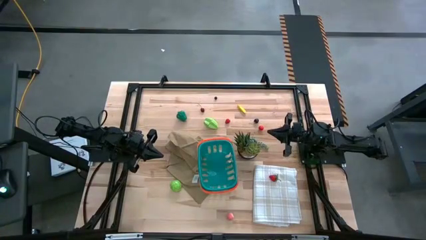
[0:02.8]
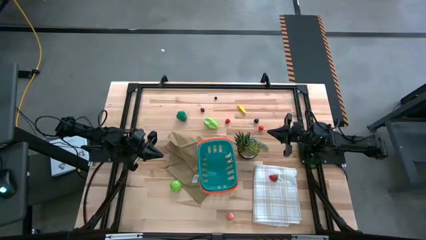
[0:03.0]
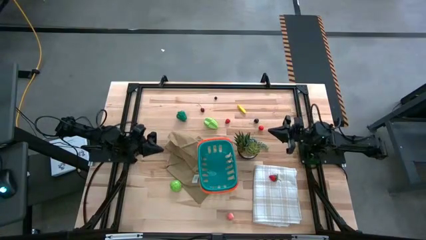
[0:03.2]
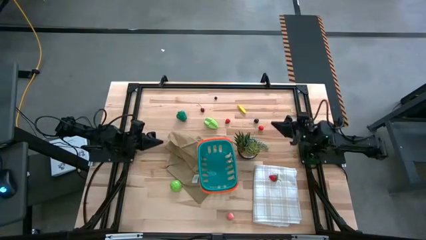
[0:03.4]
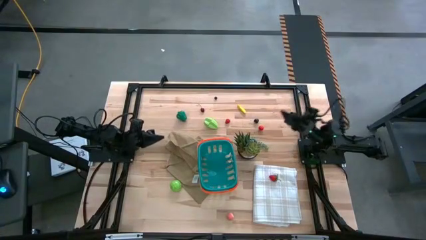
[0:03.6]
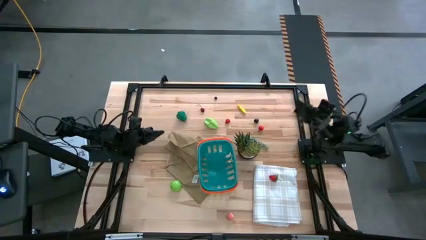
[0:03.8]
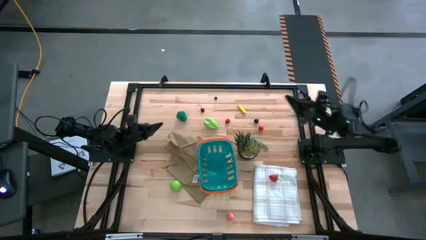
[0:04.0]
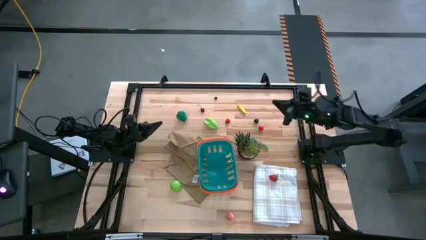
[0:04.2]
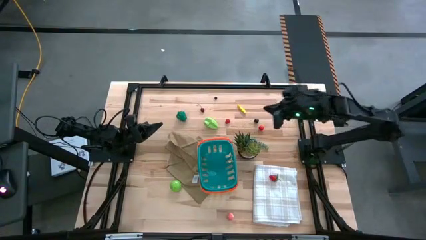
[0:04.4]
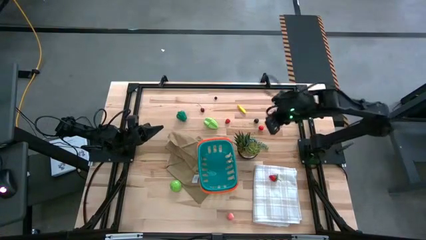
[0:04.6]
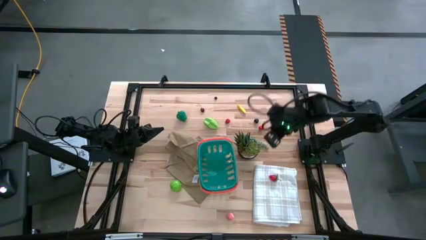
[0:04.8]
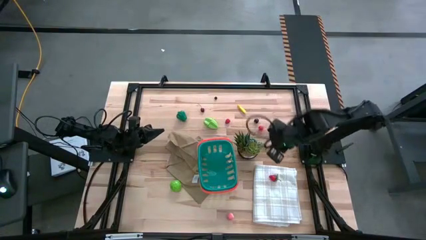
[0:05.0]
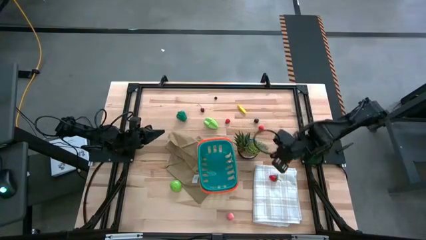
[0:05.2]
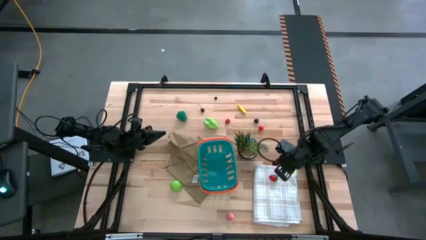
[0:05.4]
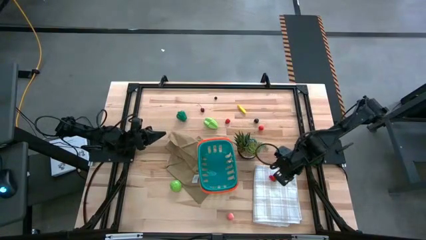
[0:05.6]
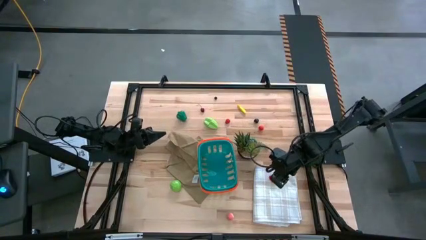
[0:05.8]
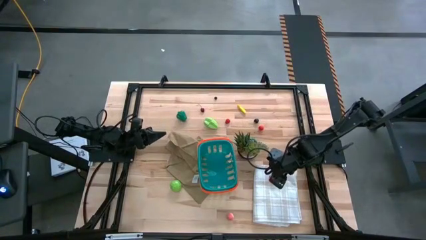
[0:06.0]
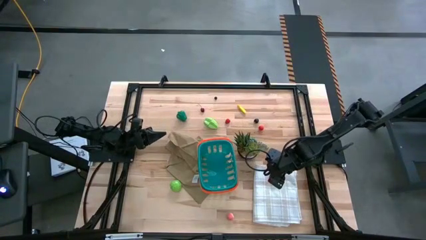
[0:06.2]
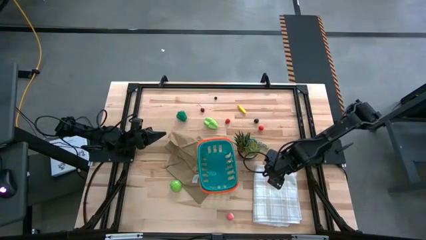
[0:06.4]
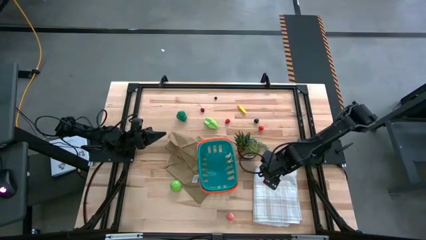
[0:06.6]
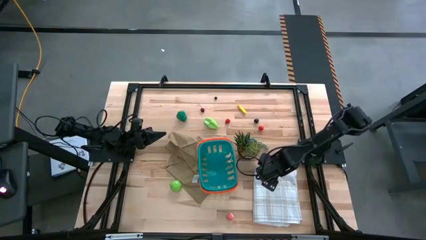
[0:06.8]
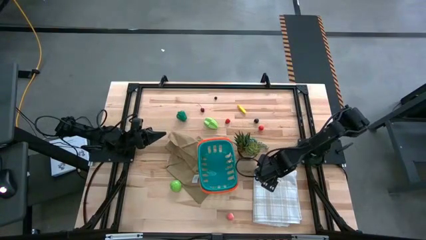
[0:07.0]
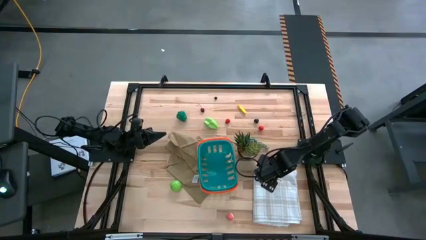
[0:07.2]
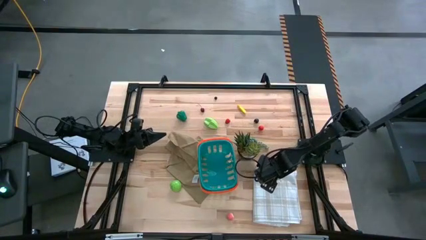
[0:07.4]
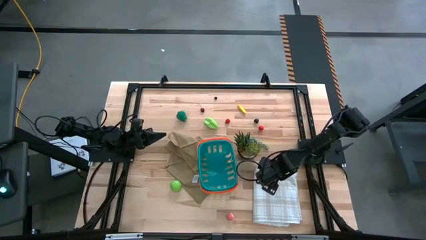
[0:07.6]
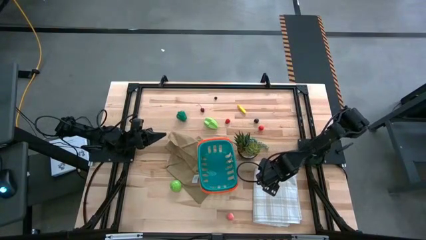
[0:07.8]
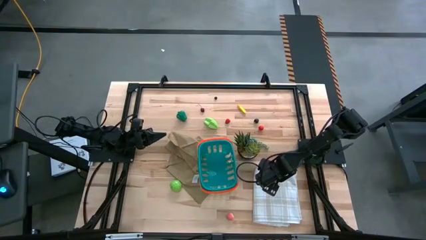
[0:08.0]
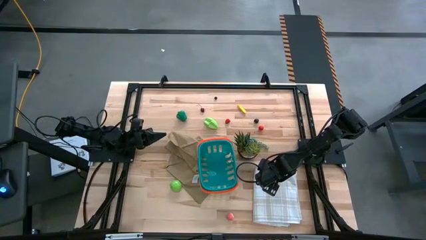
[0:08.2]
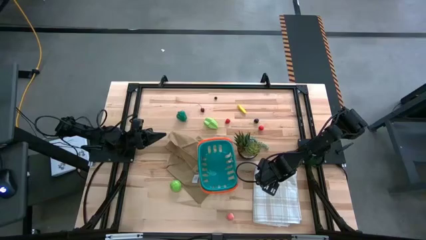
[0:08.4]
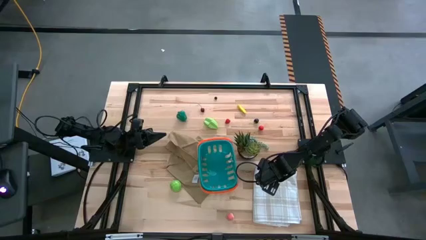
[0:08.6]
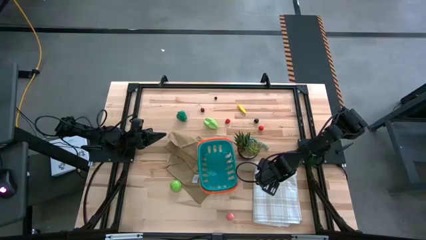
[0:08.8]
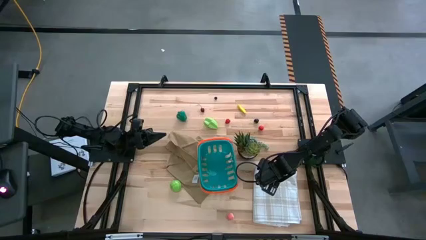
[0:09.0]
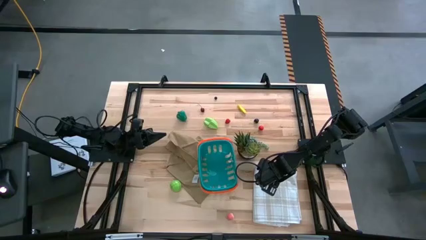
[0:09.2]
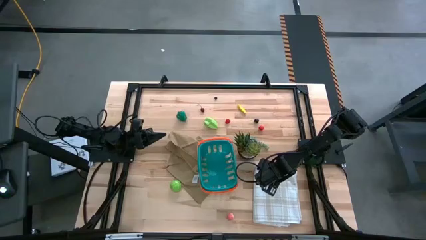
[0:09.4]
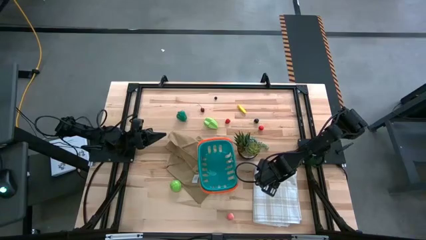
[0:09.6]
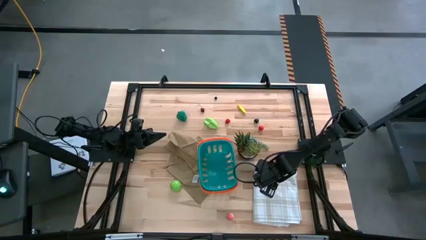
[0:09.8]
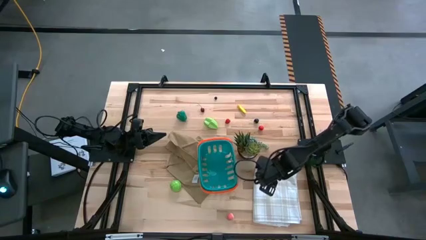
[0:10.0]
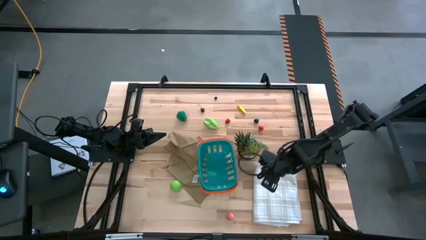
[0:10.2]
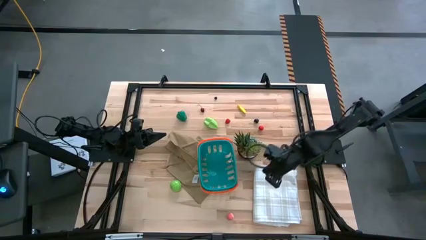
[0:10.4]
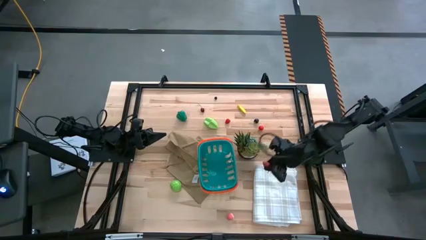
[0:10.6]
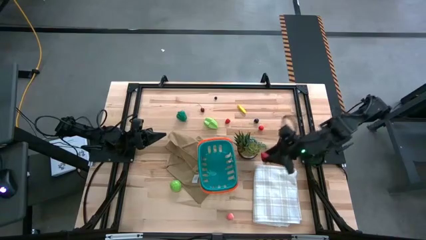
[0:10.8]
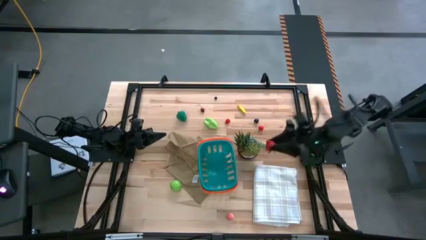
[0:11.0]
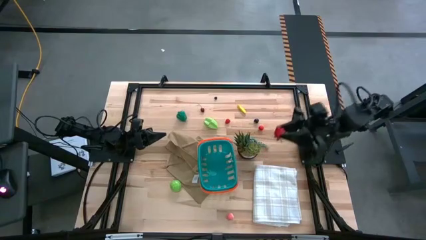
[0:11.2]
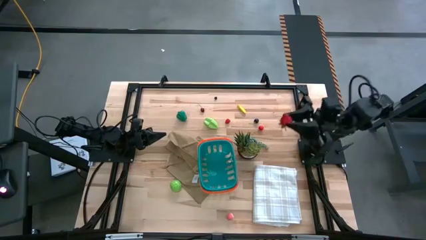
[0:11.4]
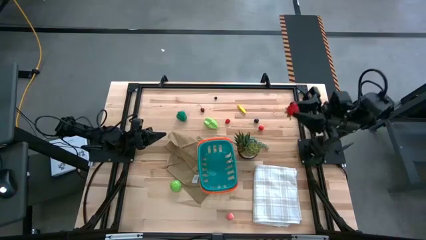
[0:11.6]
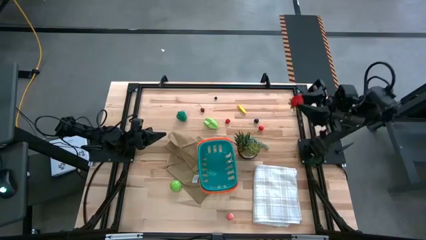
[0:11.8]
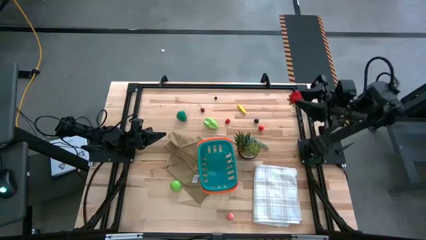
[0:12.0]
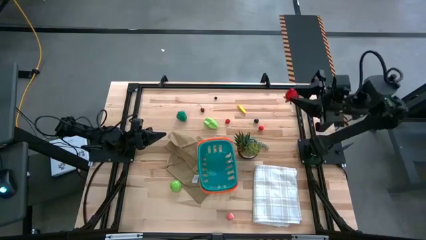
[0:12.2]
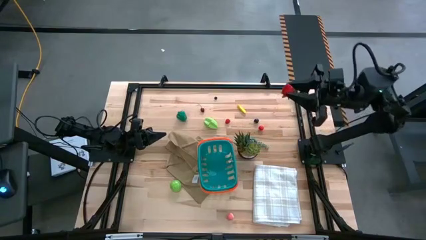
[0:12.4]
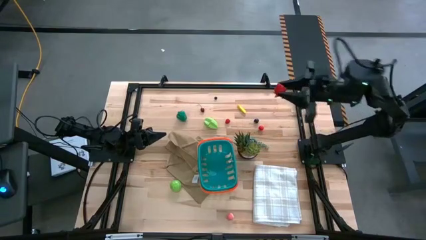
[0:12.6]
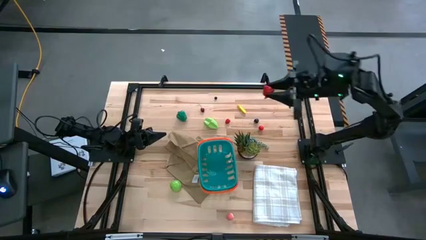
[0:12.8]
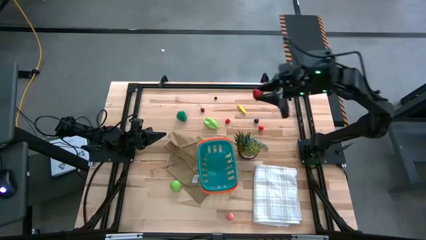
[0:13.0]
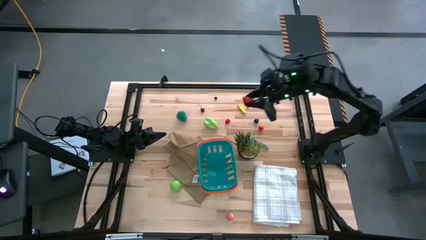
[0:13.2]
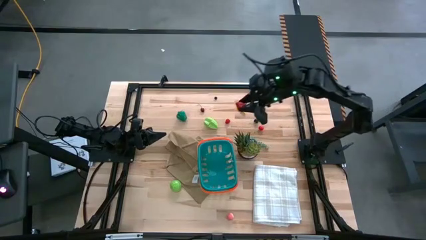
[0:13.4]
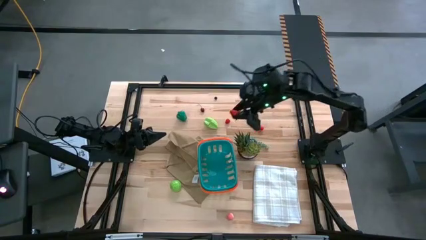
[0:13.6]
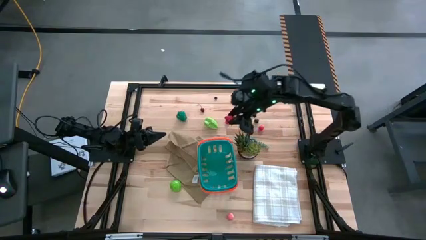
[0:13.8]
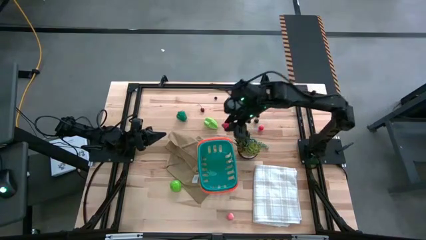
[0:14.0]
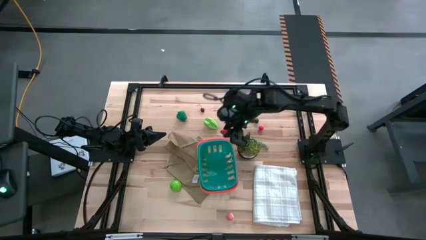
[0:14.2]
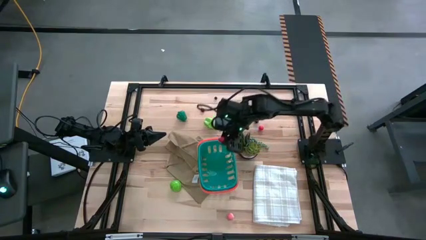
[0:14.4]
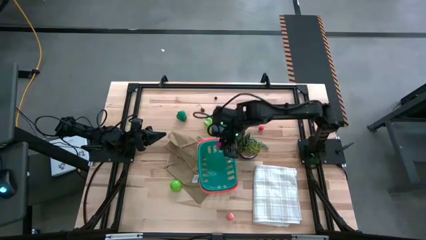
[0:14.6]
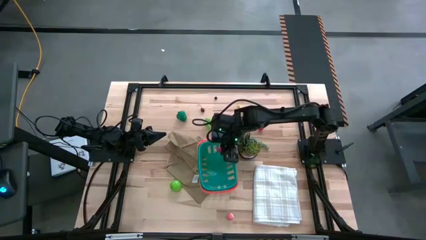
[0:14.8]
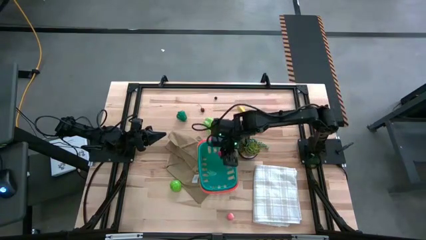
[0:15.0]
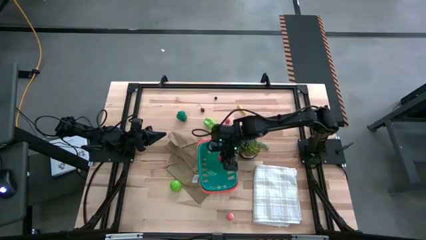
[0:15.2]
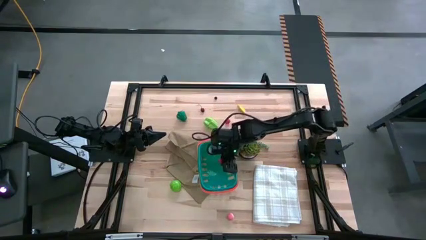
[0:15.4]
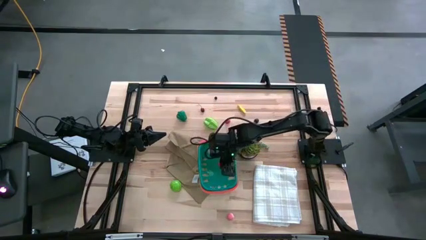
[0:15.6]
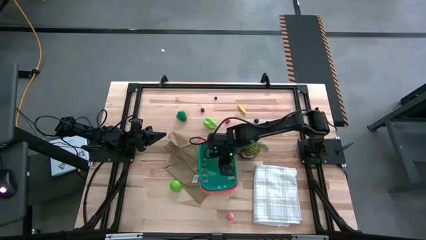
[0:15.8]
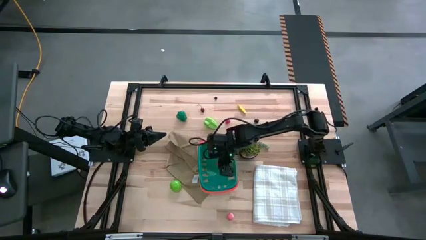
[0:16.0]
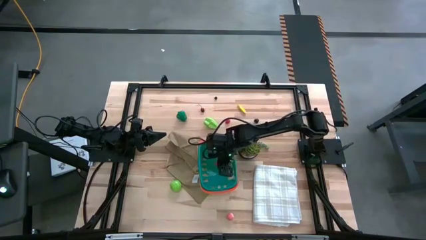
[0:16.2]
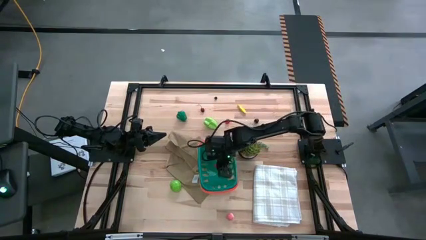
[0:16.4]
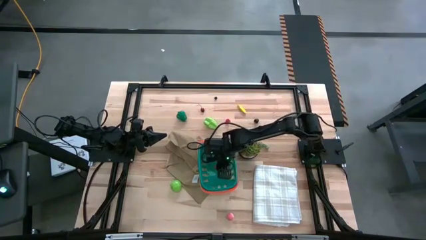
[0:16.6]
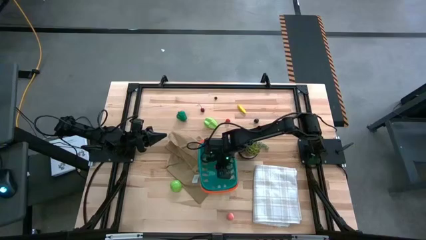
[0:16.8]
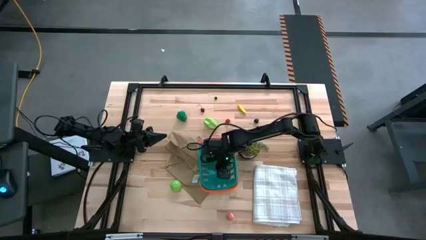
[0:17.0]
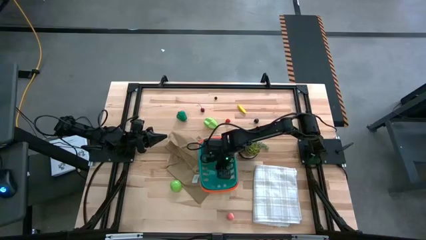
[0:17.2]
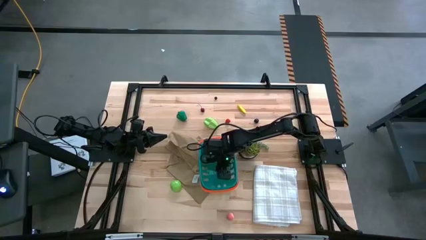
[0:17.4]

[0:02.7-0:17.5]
Task: Pick and placing Produce into tupperware
Put the red strawberry into the green basket
